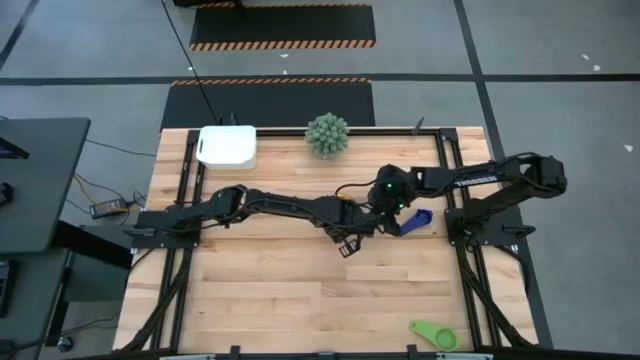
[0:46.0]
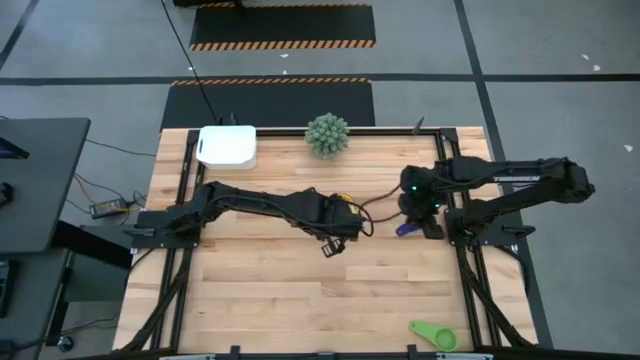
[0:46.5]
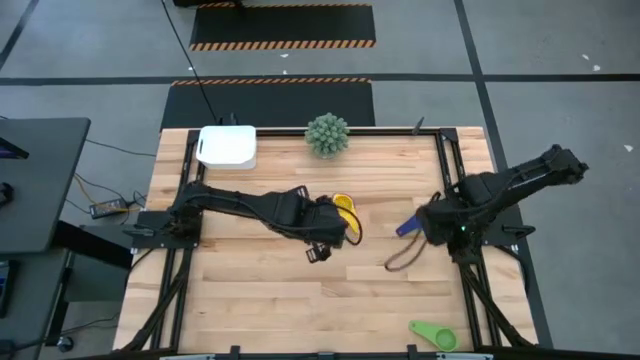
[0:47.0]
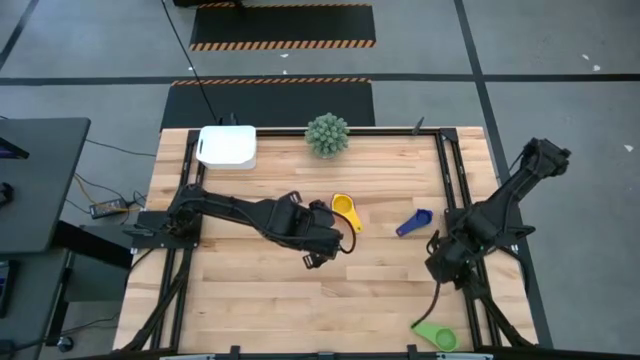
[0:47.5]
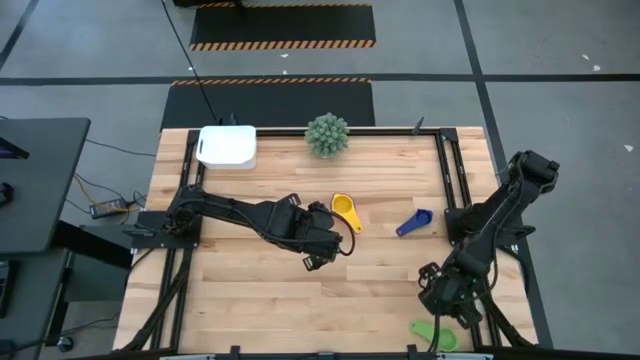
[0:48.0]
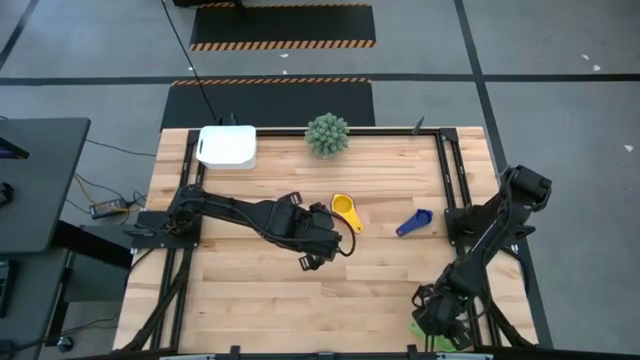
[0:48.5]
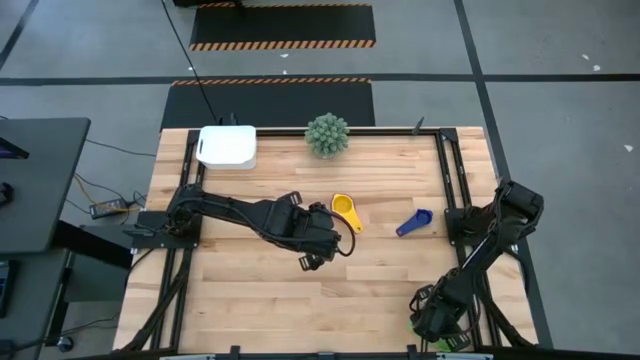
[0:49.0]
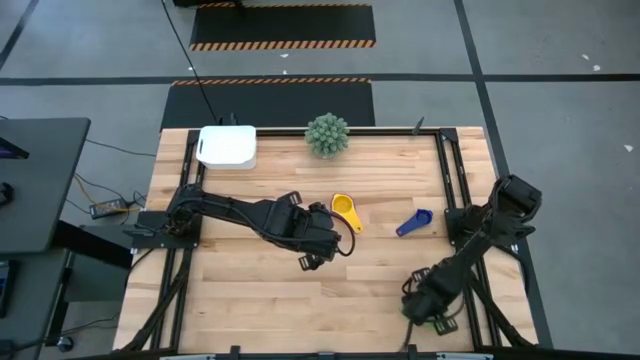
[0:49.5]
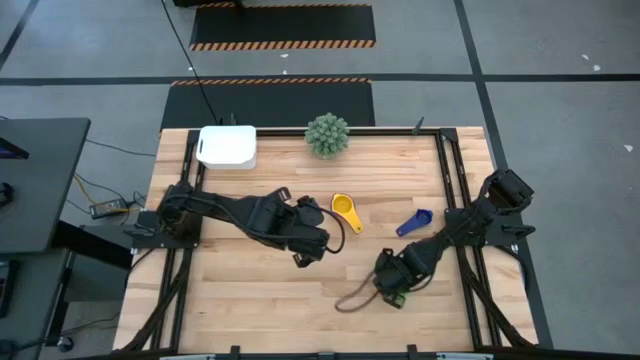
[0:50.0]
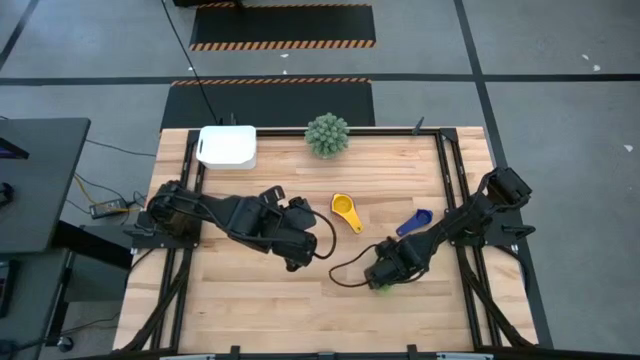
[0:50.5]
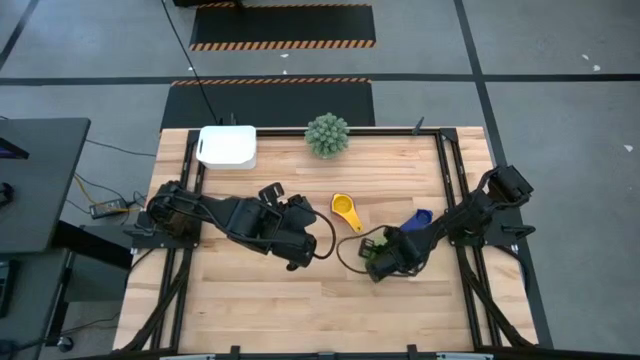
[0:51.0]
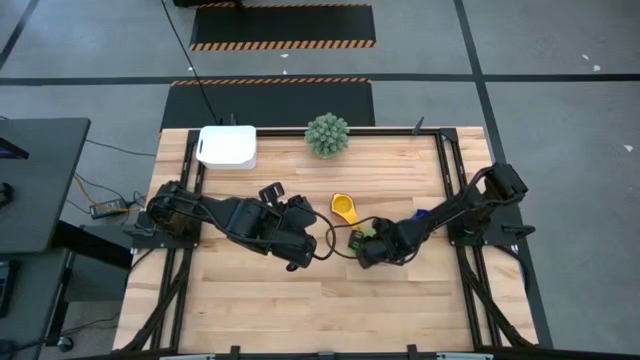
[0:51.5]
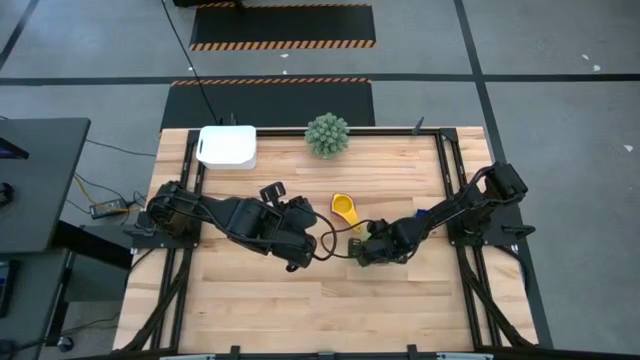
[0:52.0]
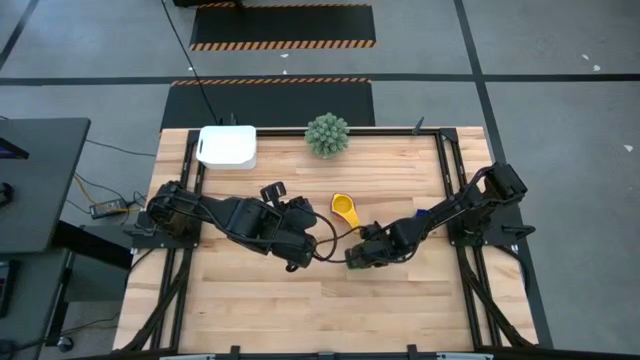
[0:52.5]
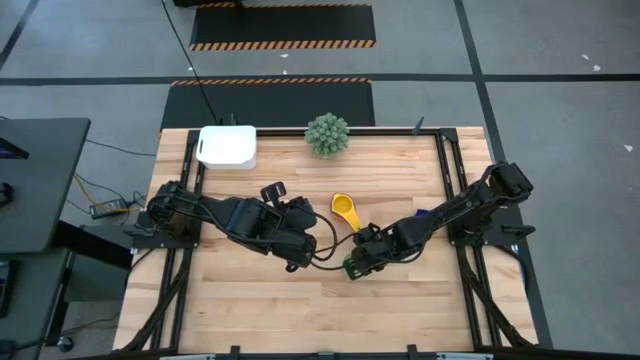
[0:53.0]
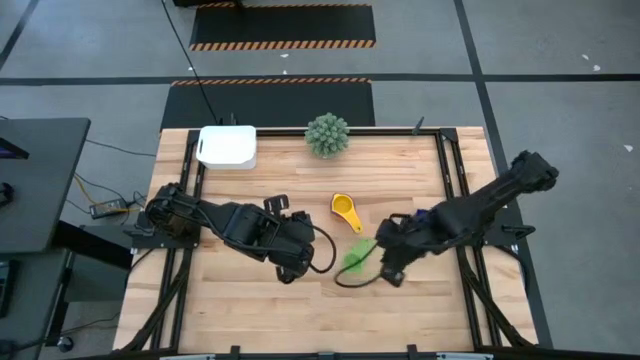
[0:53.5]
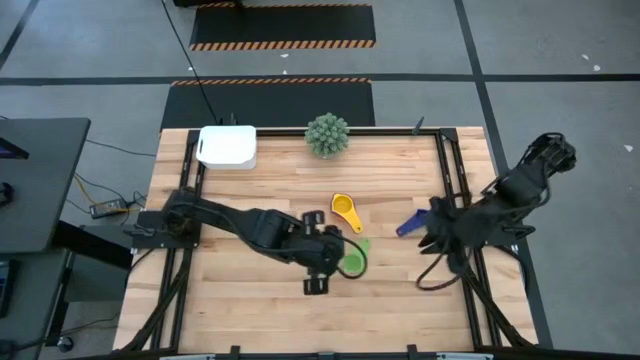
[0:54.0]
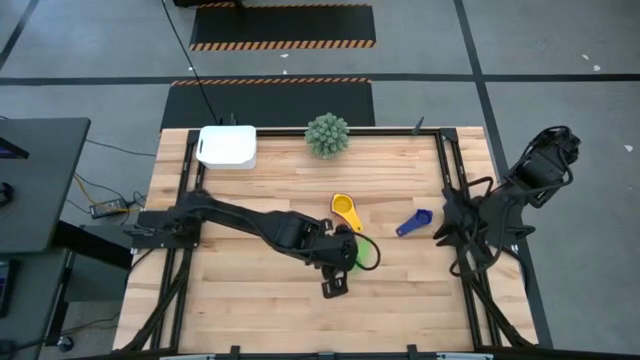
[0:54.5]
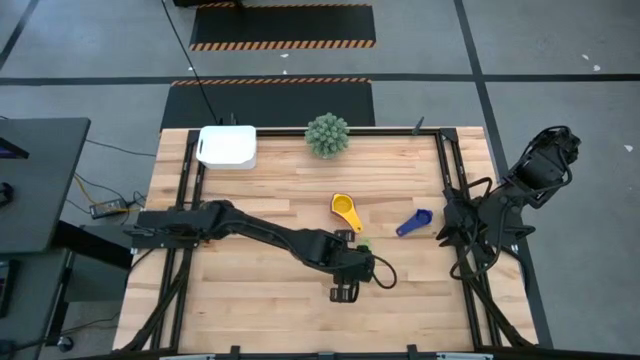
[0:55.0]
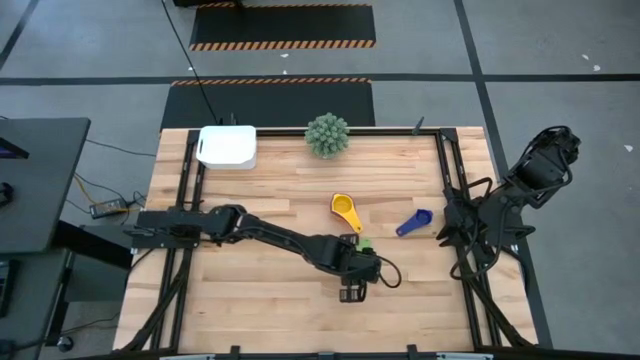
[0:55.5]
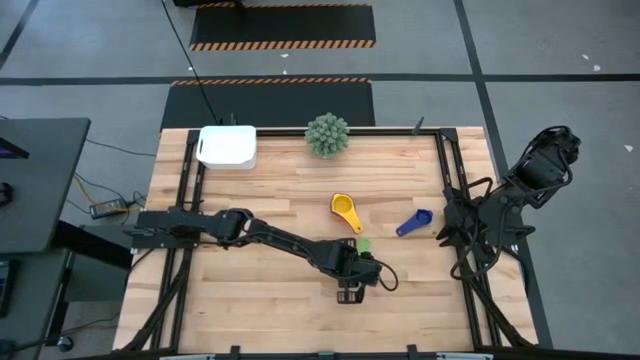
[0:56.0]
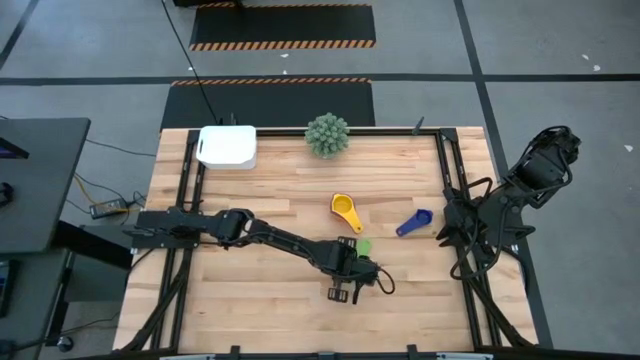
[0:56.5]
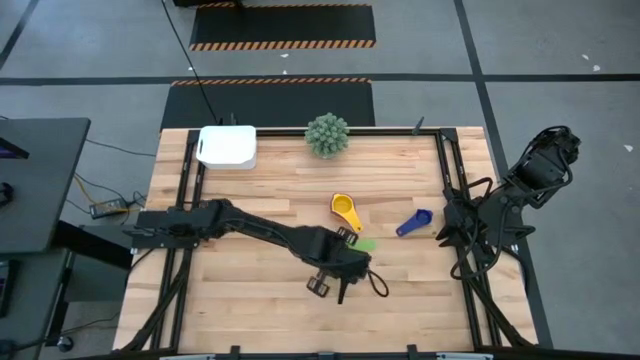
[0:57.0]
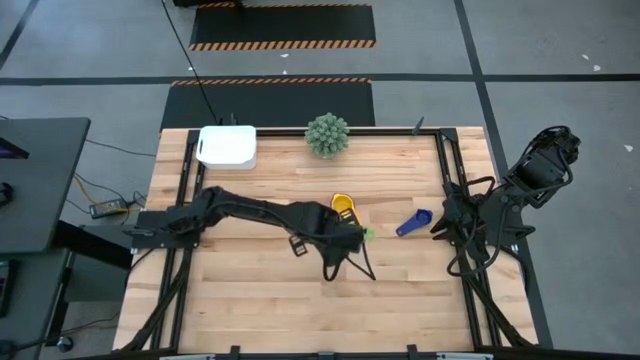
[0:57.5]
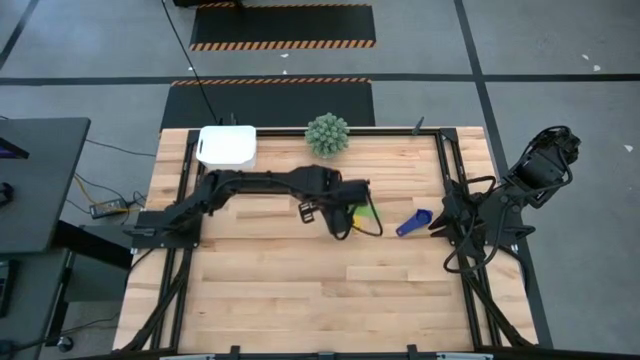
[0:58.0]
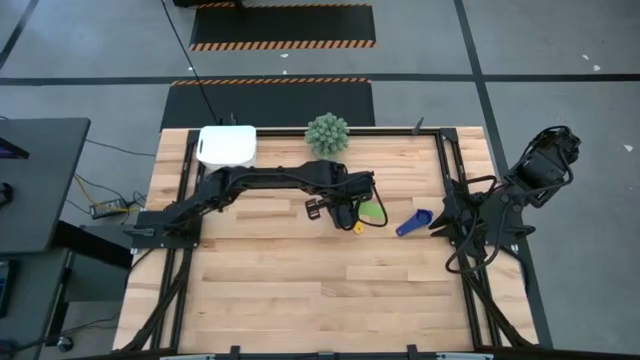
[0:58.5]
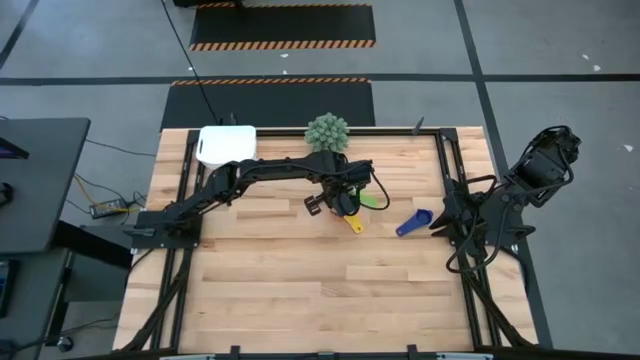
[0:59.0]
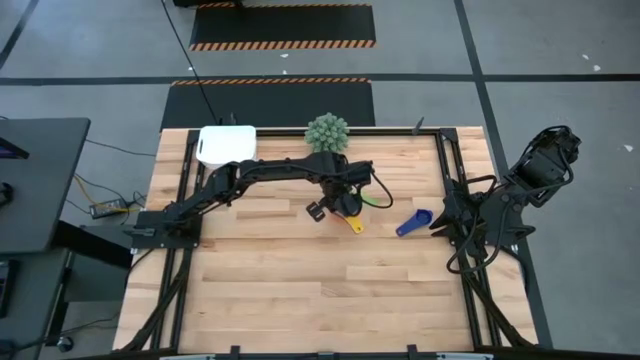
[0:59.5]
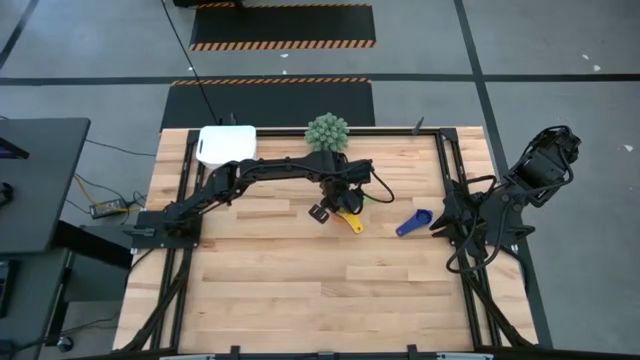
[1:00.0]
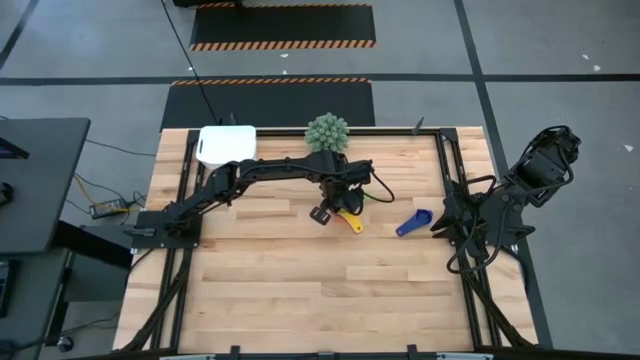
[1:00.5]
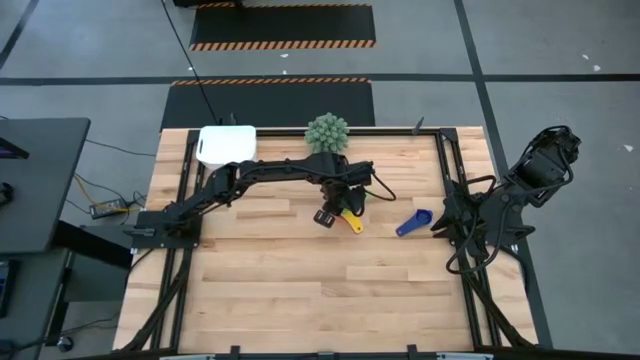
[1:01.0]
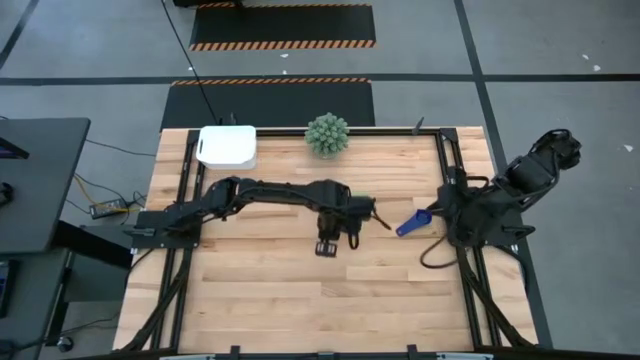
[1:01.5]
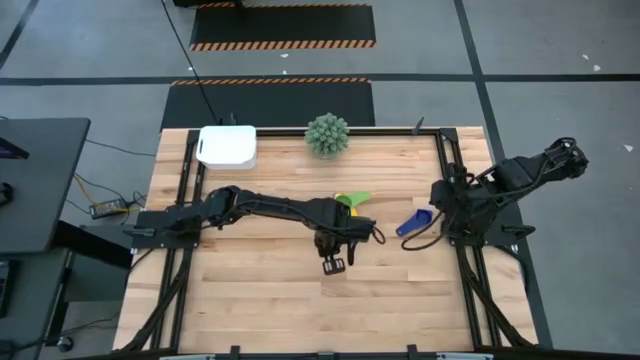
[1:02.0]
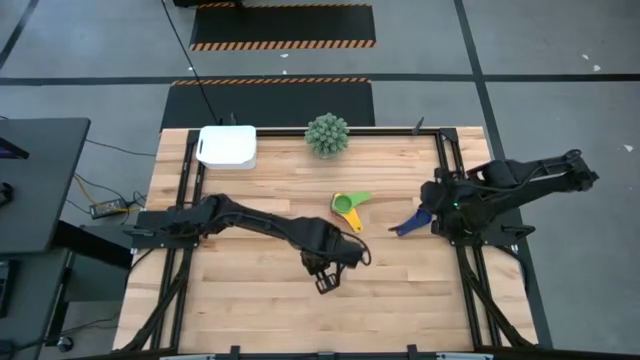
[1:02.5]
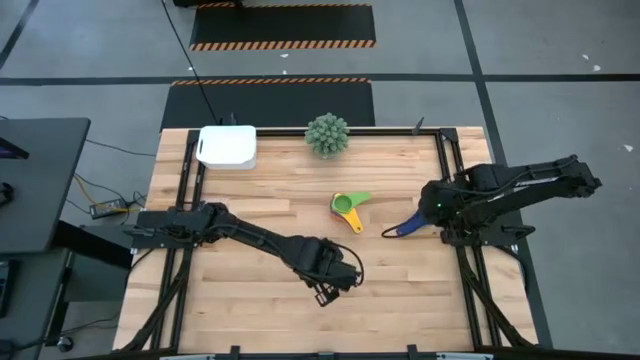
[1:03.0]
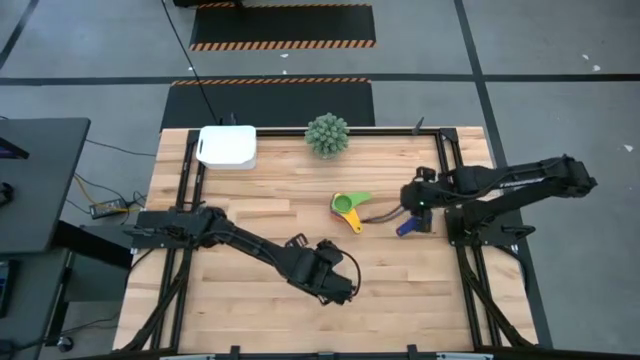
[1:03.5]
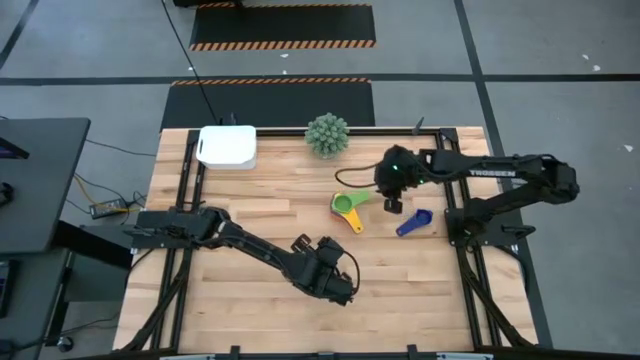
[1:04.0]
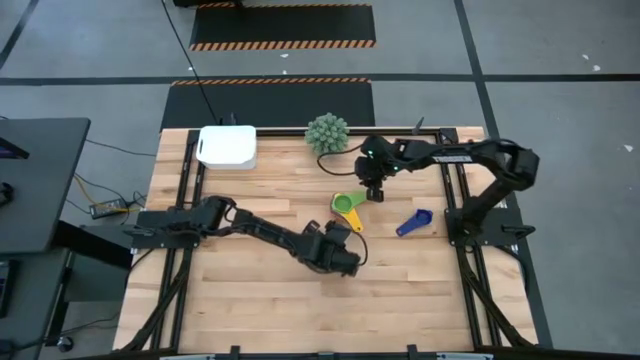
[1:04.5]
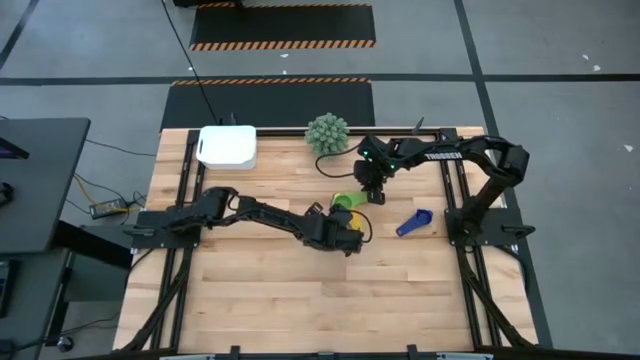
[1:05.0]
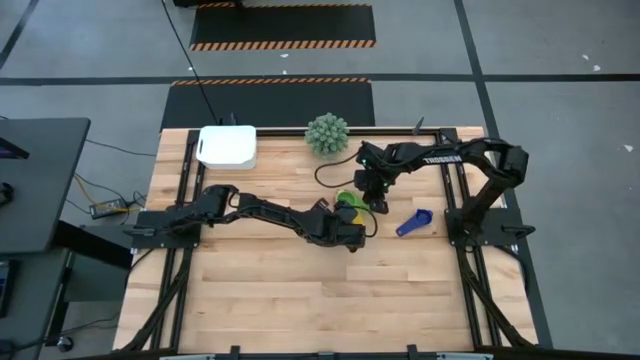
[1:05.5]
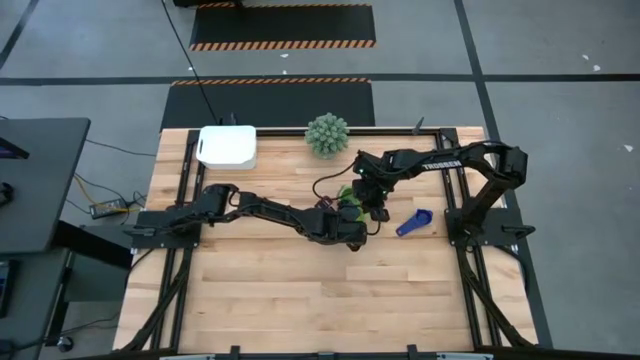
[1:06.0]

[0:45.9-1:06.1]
Task: Nest measuring cups in basket
Stack the green measuring cup on top of the yellow measuring cup
